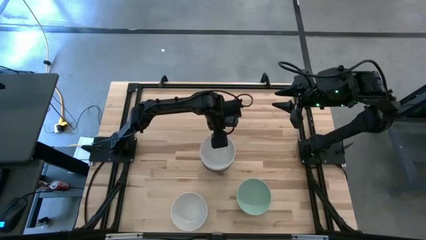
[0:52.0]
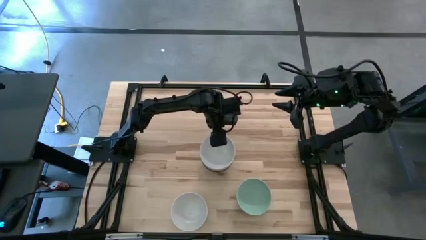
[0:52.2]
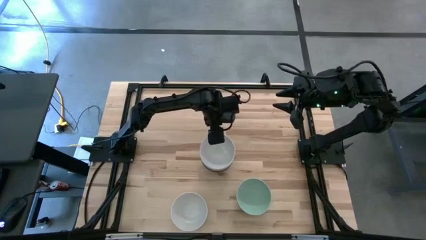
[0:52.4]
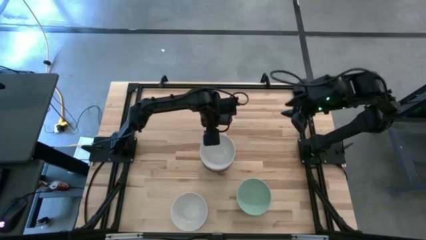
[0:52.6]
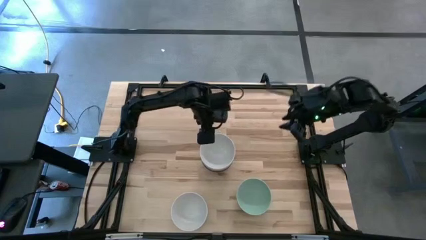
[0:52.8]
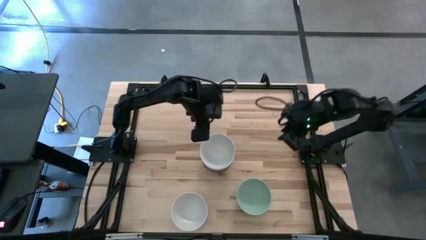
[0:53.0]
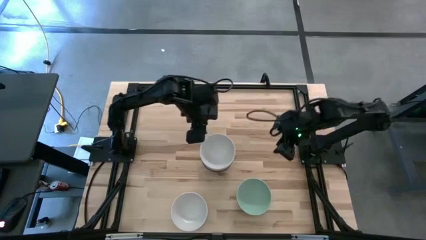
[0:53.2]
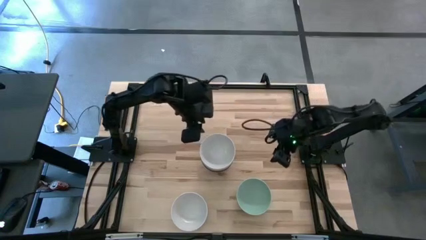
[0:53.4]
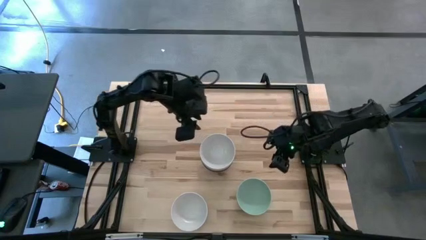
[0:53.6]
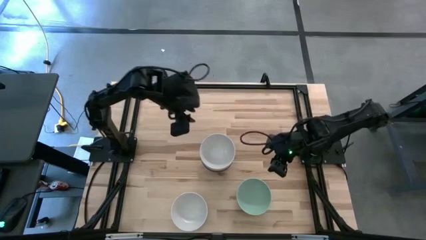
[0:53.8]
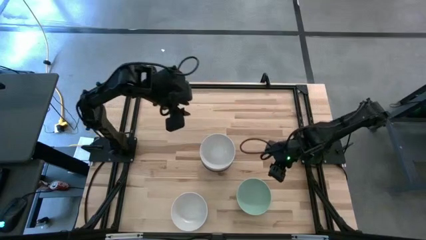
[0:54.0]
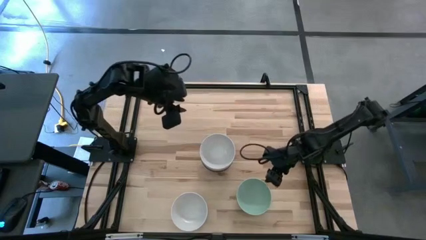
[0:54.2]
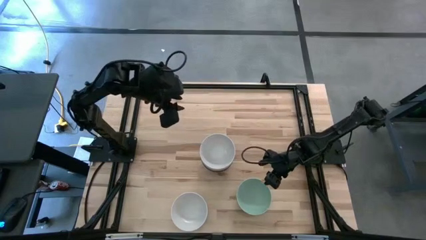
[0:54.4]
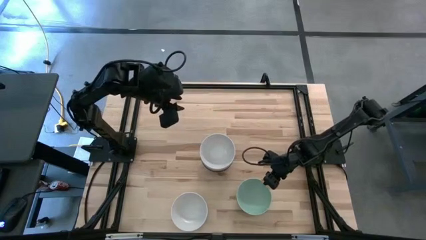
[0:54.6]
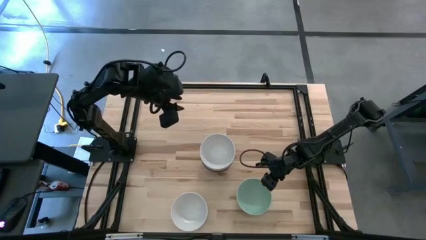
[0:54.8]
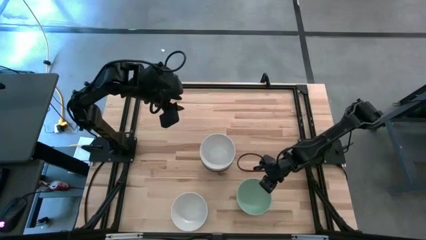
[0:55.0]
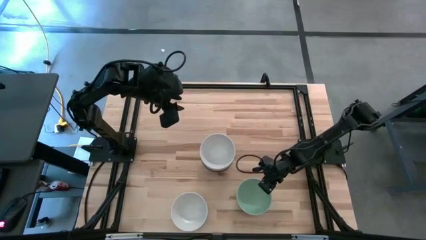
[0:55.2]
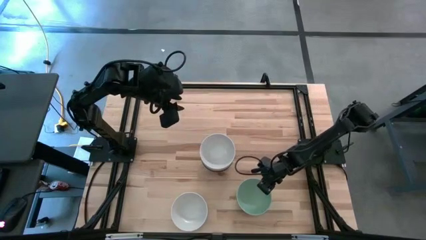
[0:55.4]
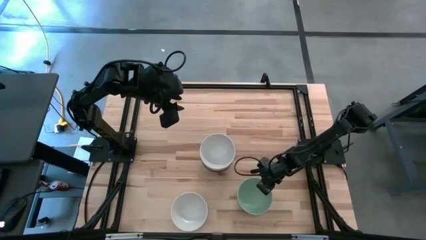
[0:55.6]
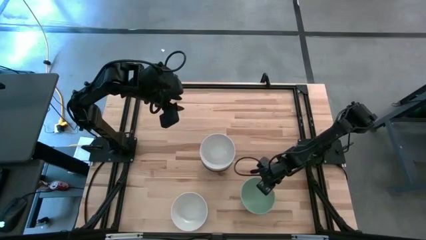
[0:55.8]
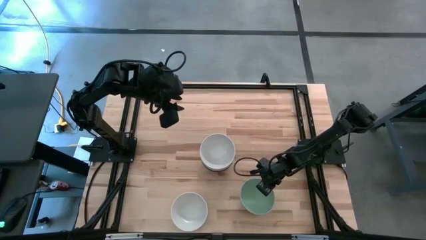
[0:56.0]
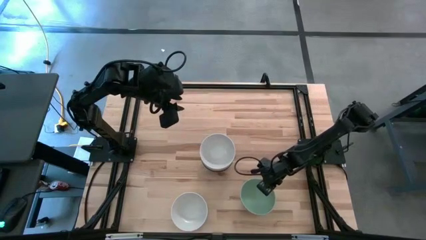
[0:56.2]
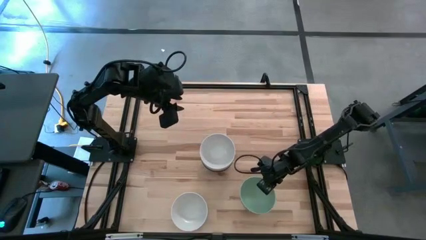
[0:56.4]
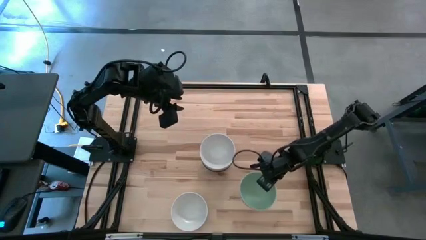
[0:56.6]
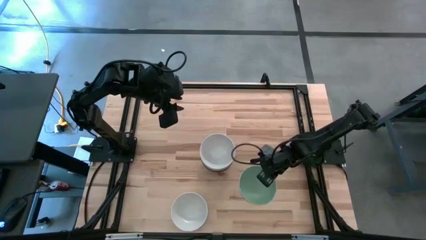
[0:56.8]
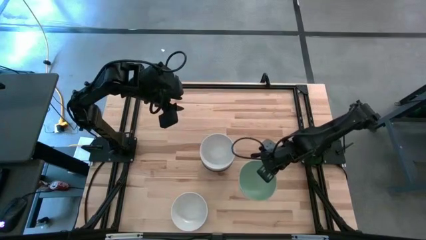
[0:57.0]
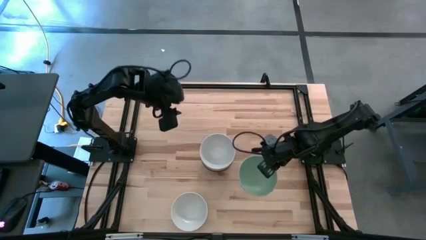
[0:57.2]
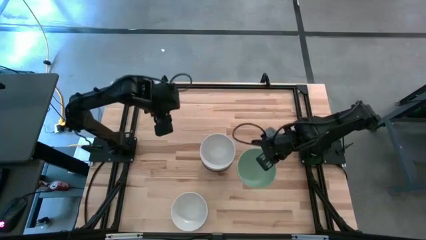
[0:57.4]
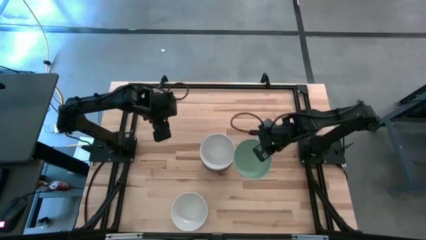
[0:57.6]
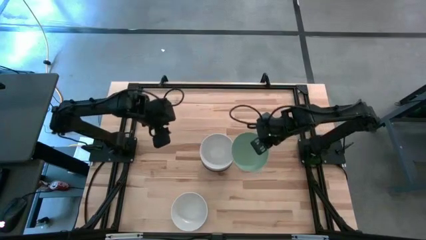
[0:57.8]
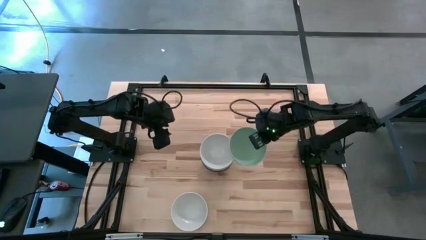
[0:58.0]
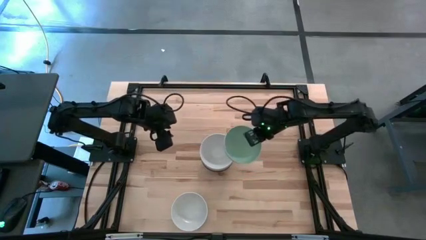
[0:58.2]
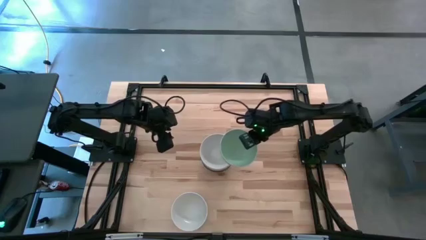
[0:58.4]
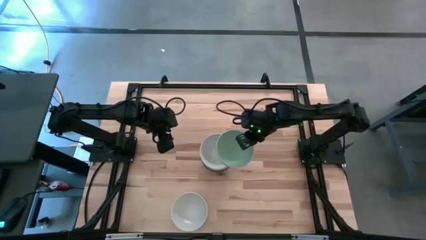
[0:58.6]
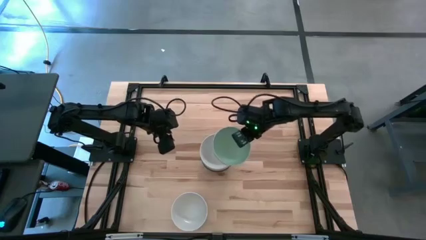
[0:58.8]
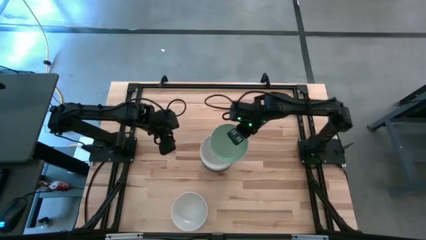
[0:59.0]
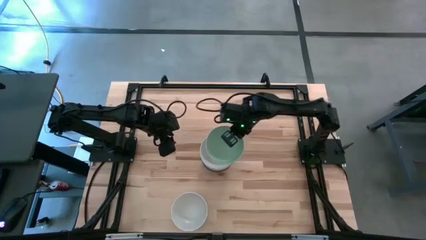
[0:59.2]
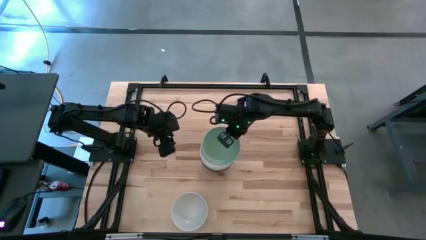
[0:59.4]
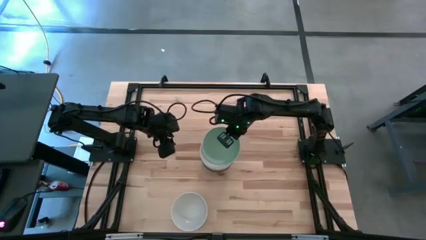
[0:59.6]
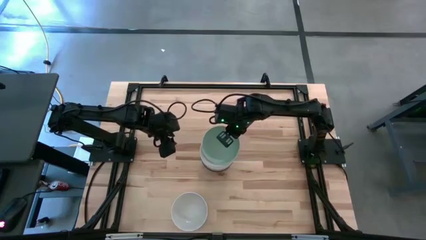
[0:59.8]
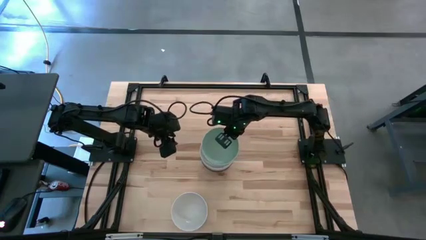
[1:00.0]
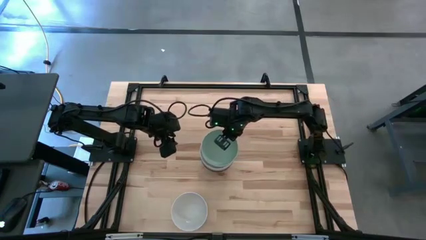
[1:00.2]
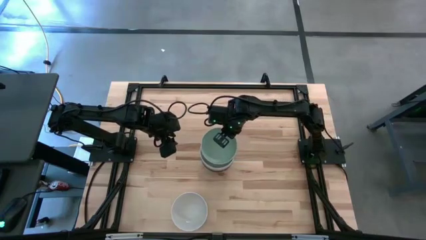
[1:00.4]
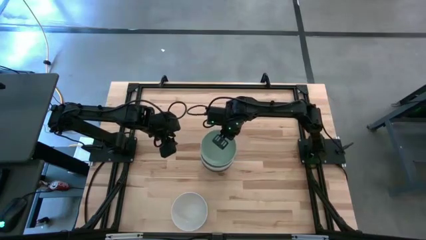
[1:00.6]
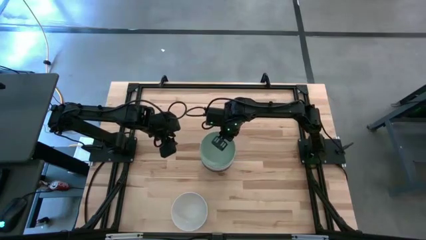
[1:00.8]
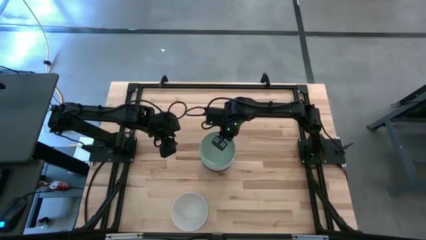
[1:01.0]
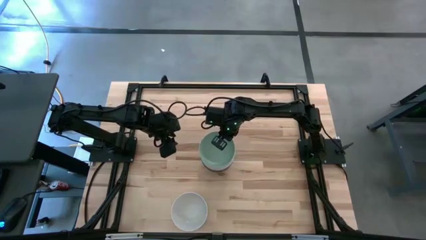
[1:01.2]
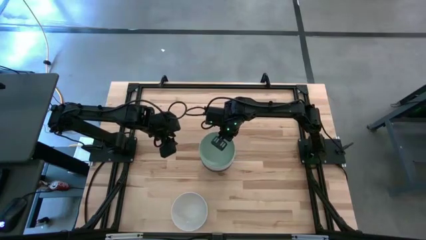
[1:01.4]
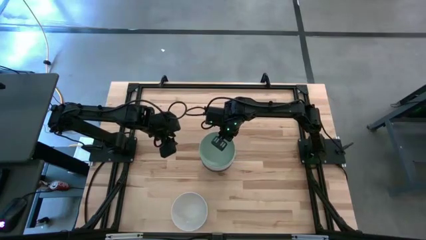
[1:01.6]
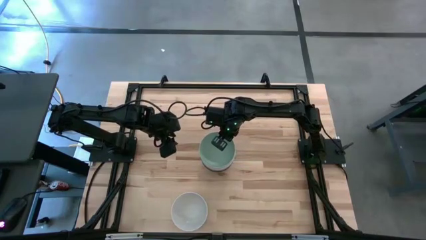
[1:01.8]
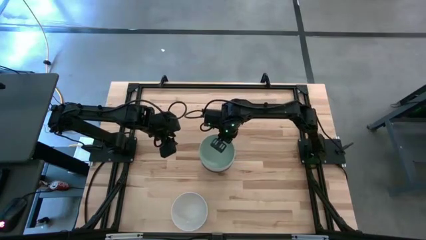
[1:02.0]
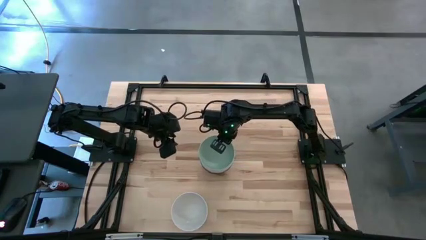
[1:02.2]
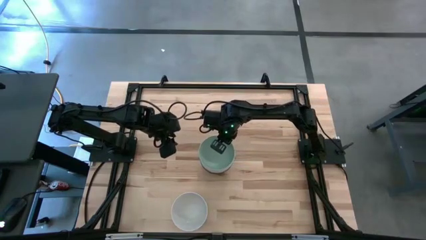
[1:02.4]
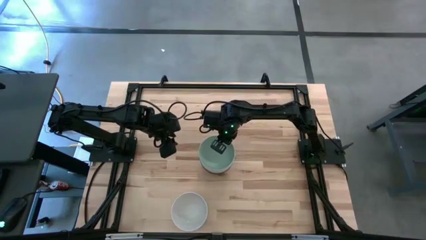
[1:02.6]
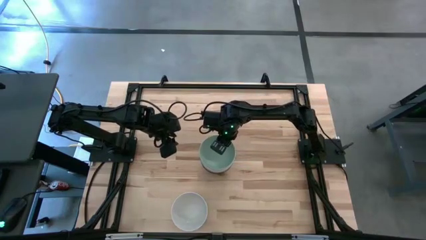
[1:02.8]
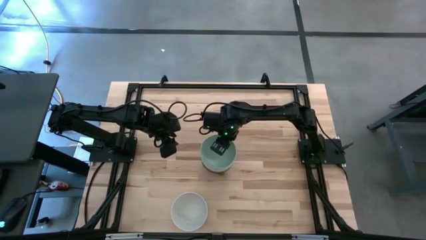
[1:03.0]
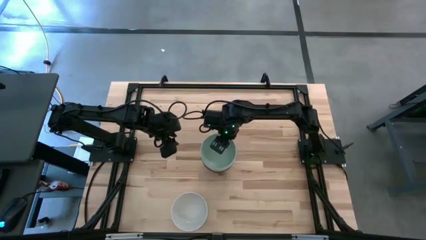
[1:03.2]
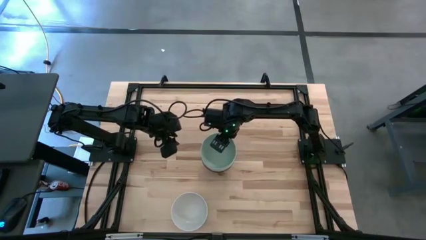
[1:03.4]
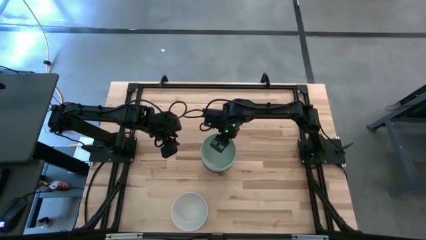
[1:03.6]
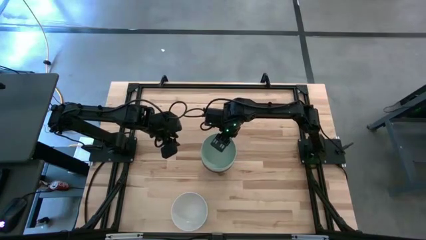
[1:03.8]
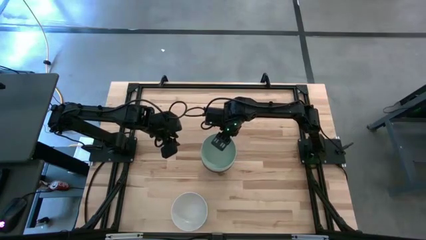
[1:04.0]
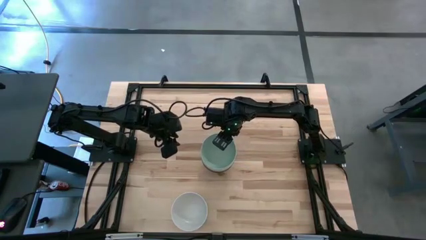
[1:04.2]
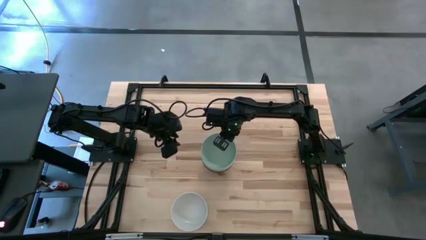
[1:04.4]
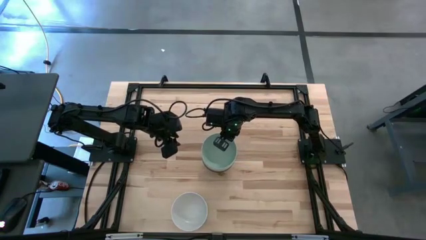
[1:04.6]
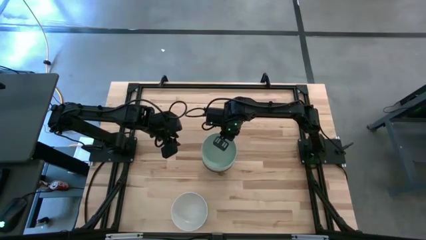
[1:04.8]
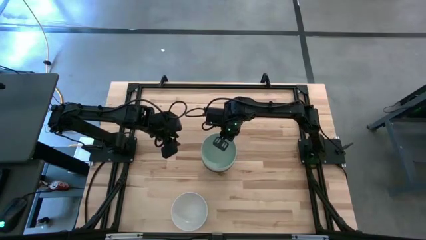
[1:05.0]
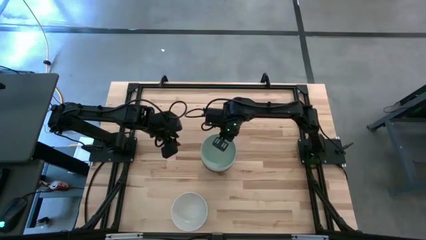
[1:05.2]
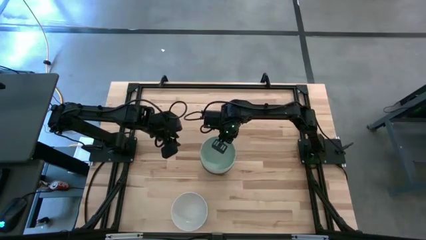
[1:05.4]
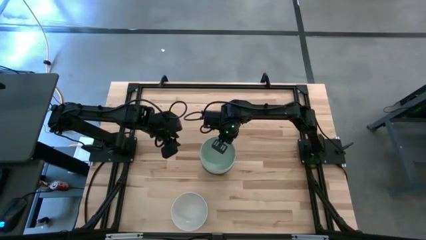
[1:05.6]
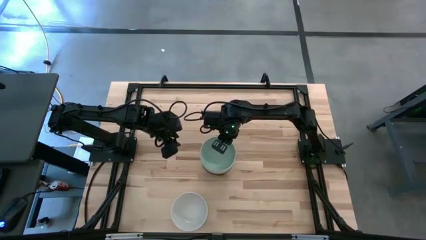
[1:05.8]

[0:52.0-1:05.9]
Task: Nest bowls inside each other
Stack the green bowl on the white bowl
